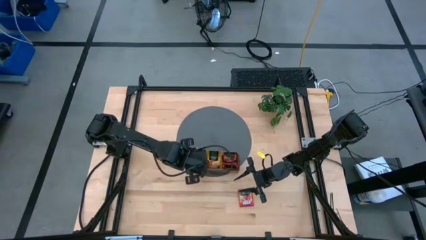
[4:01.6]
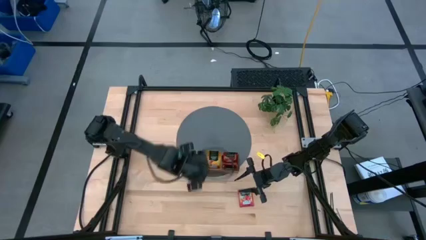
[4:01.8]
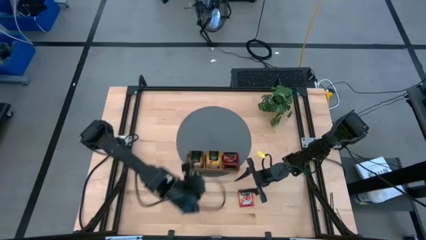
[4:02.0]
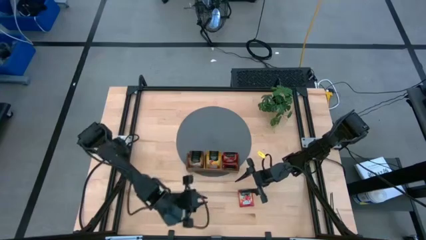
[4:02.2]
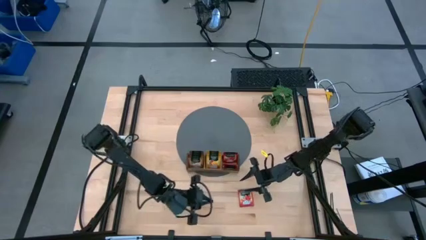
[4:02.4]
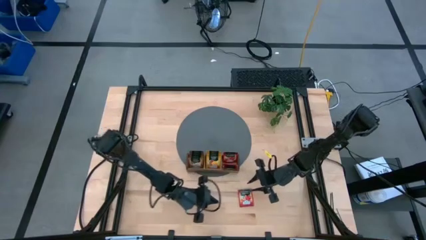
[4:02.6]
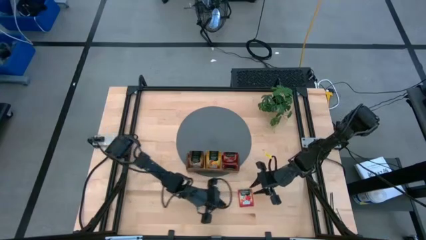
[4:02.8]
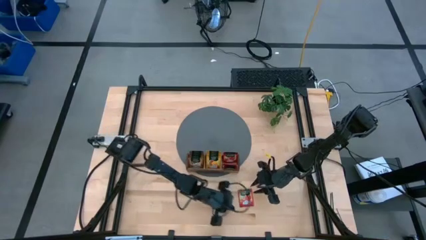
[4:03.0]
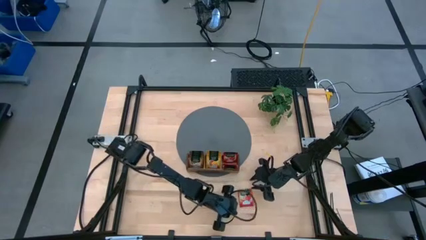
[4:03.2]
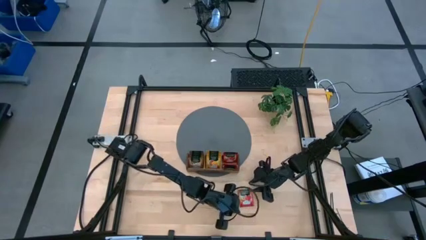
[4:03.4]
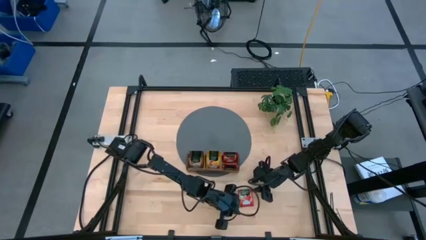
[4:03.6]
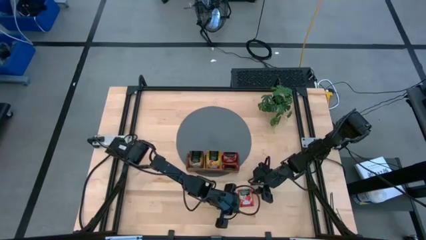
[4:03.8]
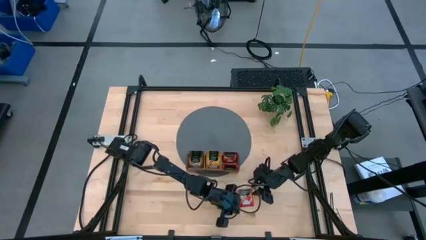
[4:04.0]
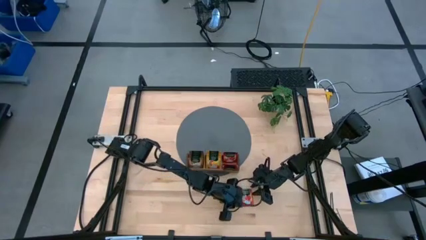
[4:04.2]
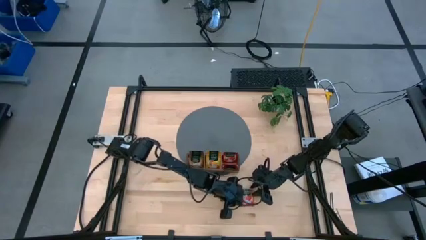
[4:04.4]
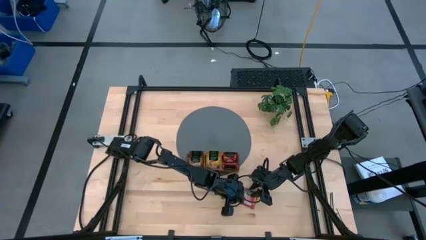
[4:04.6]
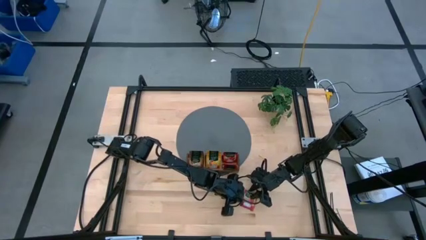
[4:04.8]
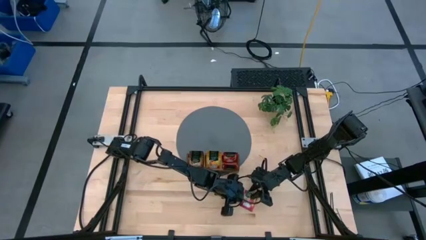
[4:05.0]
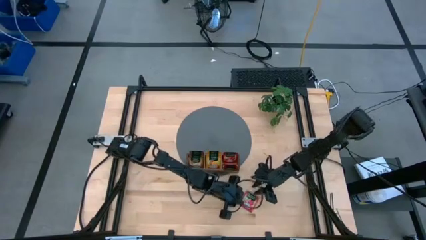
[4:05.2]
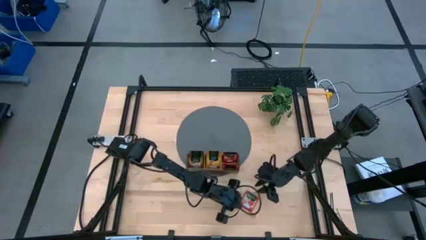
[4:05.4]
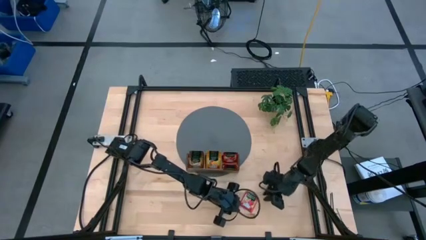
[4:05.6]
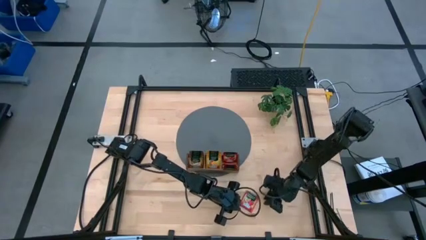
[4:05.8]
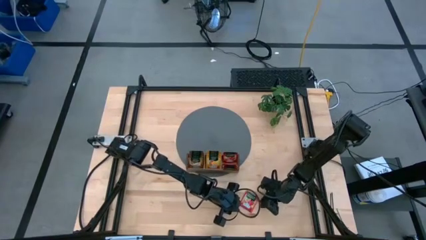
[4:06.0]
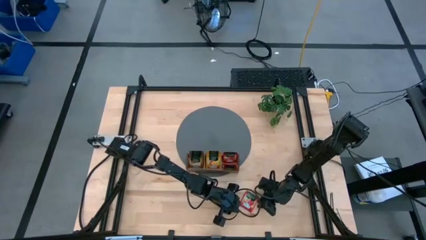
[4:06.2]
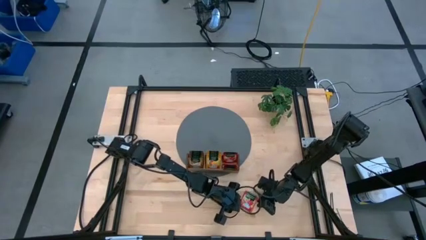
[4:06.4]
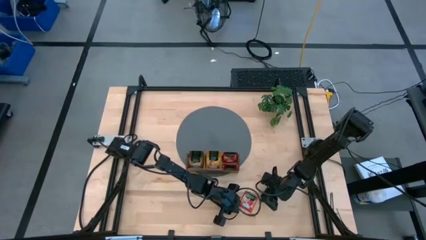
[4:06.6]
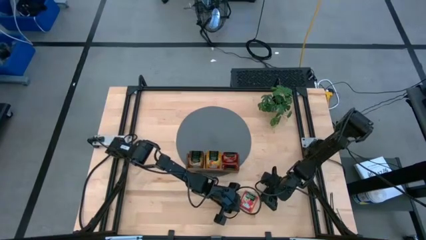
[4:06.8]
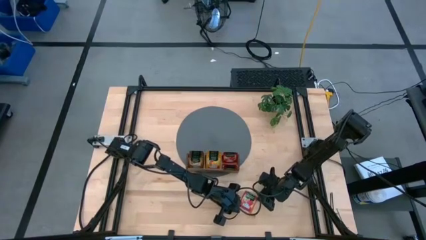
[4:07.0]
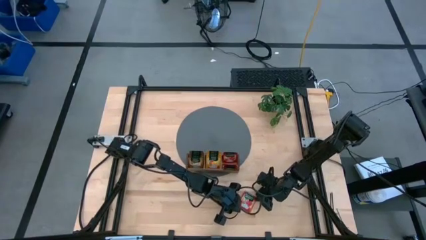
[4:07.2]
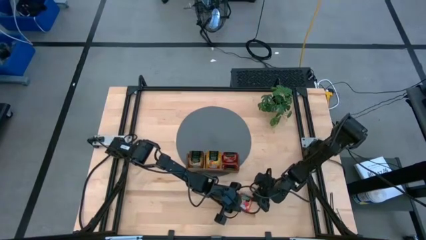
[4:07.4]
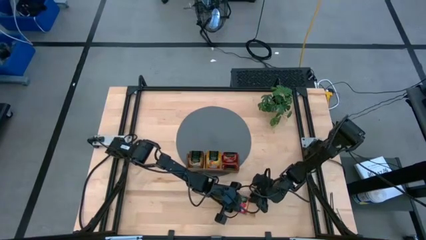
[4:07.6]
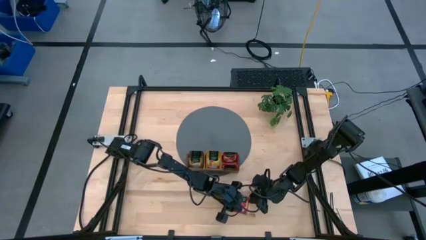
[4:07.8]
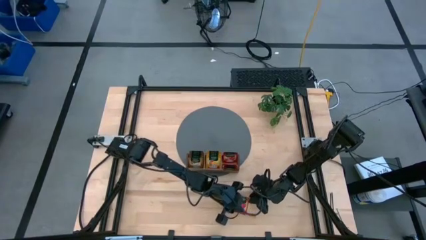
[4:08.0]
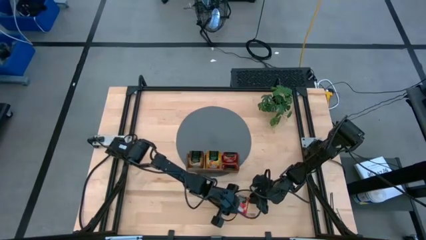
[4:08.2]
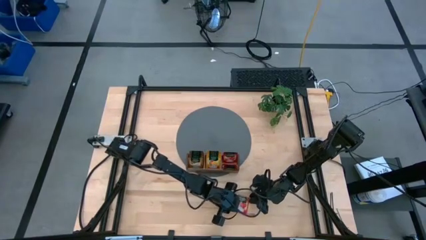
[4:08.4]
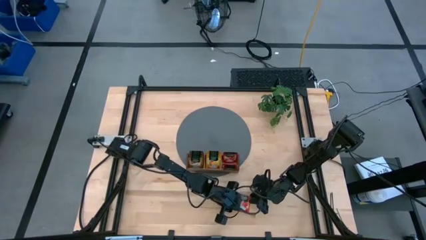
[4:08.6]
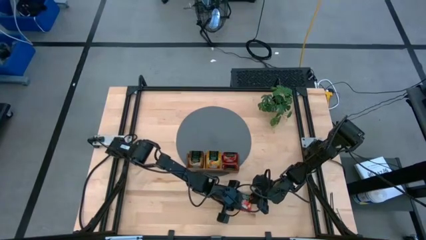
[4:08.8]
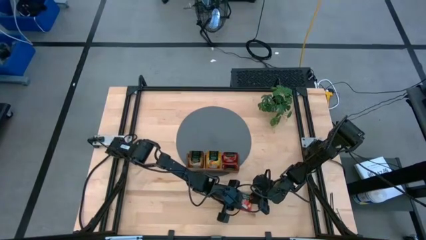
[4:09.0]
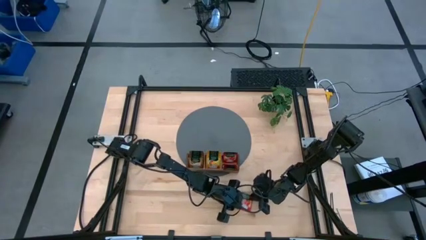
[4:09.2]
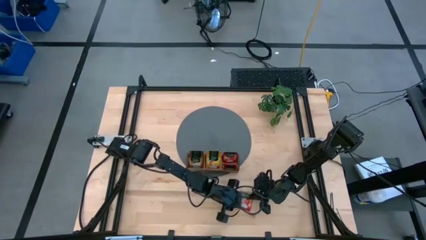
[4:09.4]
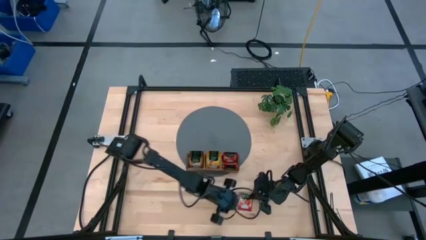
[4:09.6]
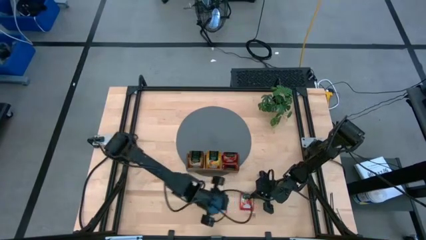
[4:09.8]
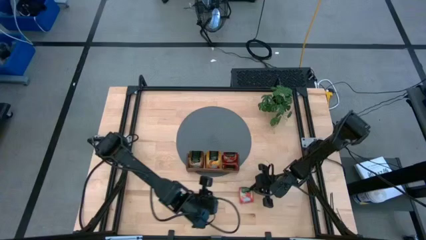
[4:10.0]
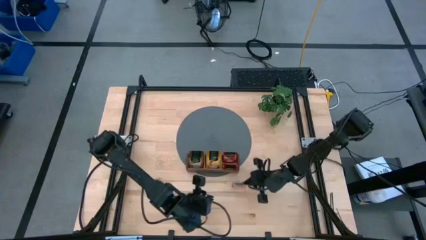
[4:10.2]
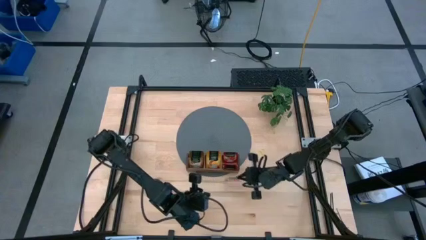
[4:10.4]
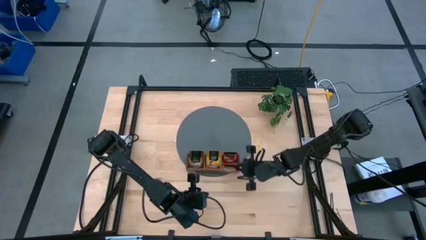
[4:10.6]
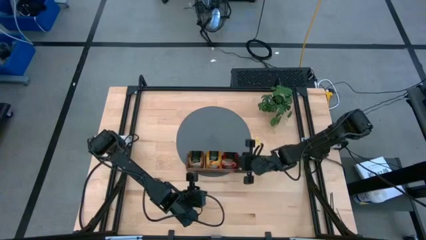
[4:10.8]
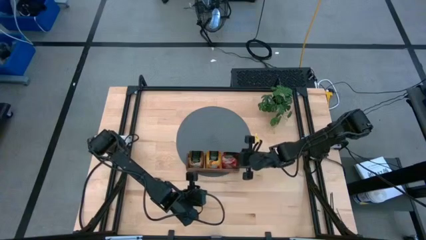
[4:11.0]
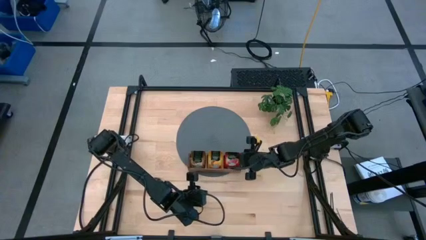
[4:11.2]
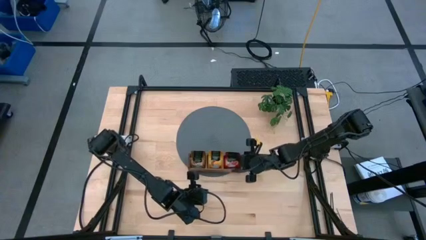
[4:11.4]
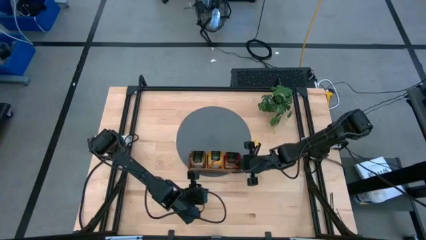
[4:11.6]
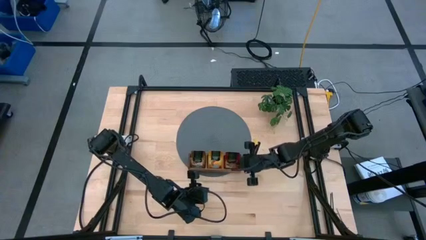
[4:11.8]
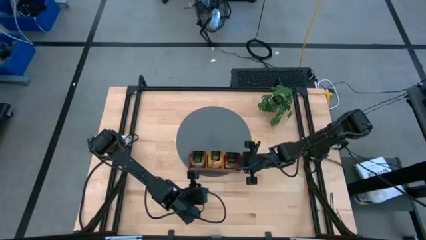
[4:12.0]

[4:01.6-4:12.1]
Task: Pick & Place Tea
Put the red tea bag into the right section of the wooden organizer
